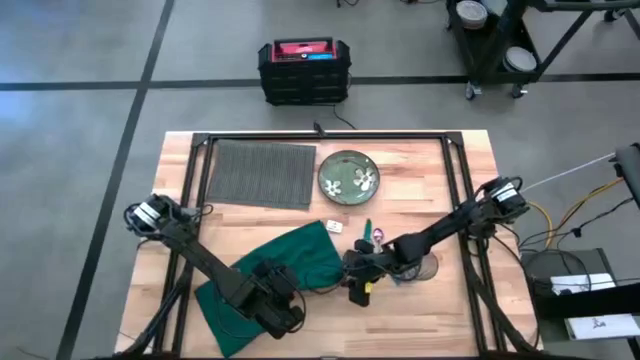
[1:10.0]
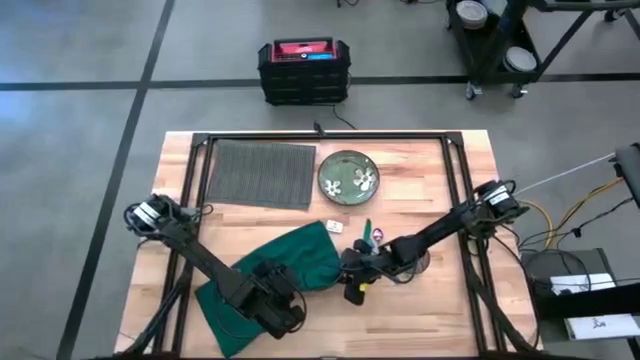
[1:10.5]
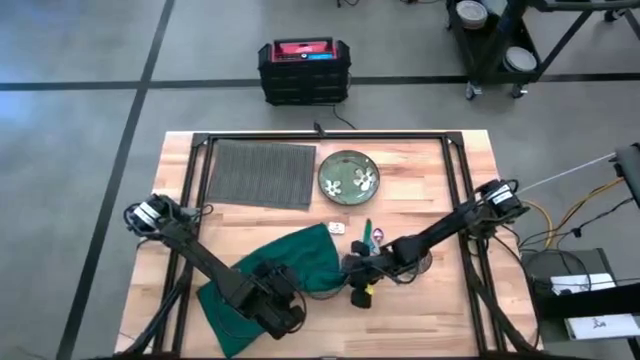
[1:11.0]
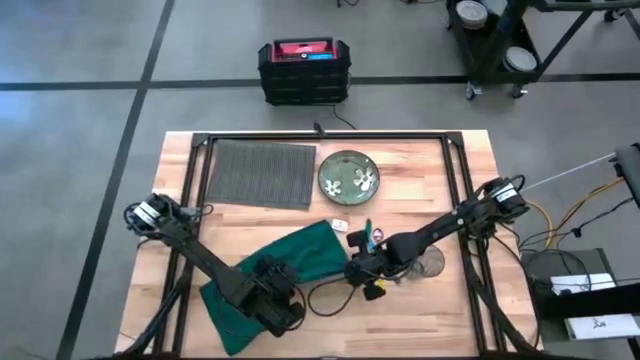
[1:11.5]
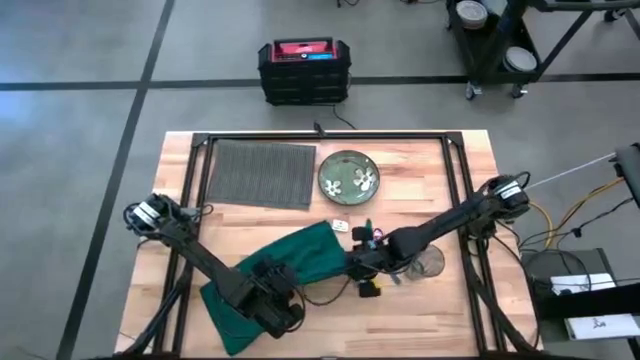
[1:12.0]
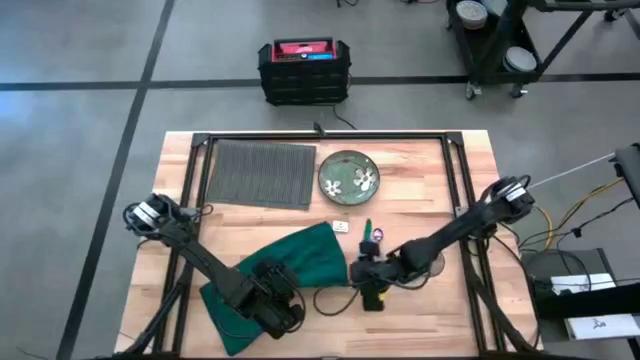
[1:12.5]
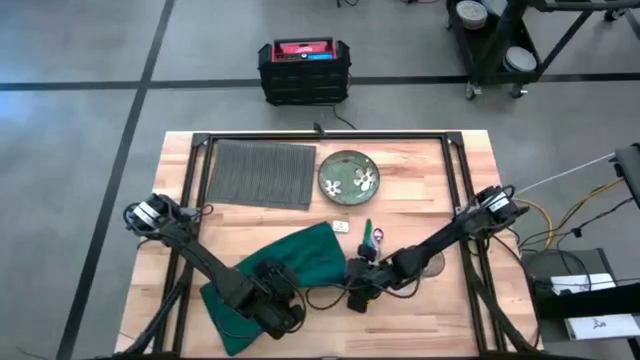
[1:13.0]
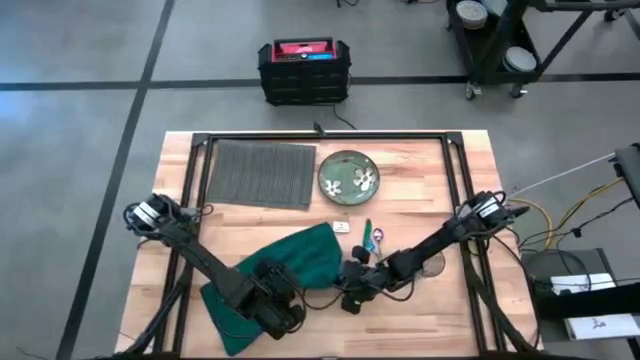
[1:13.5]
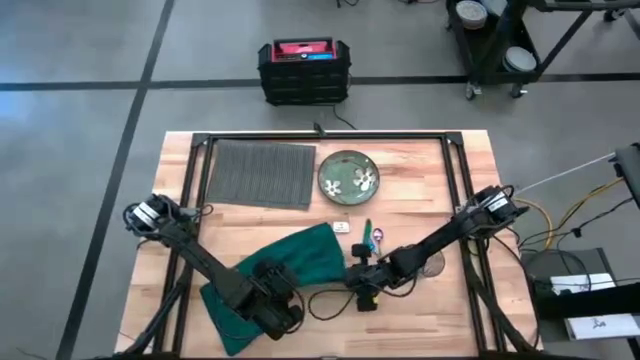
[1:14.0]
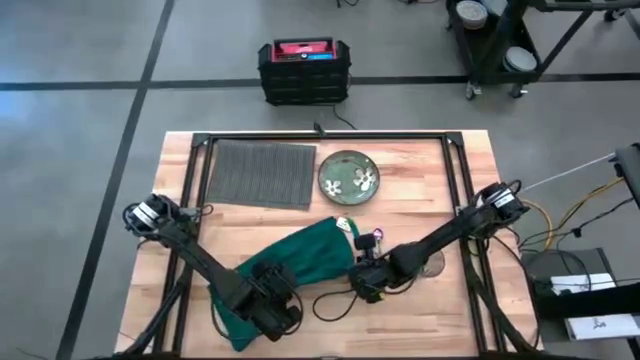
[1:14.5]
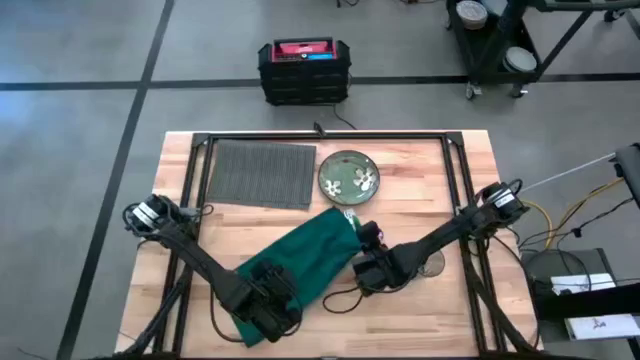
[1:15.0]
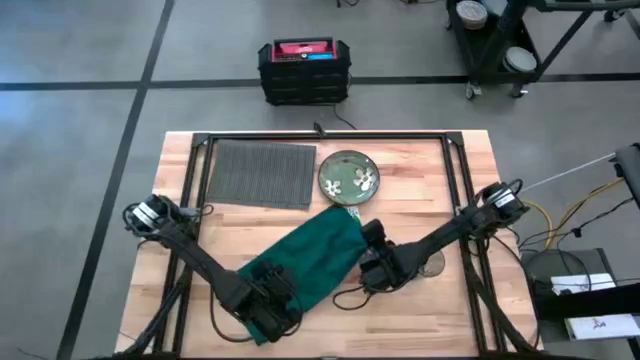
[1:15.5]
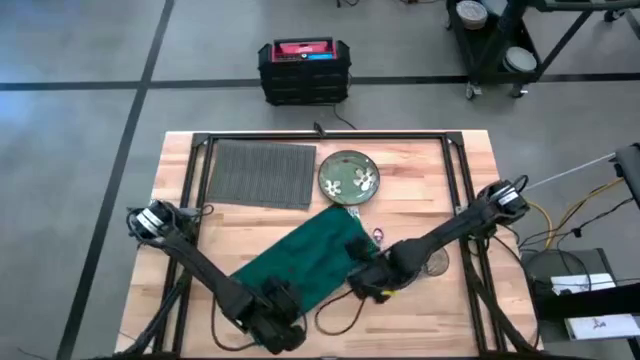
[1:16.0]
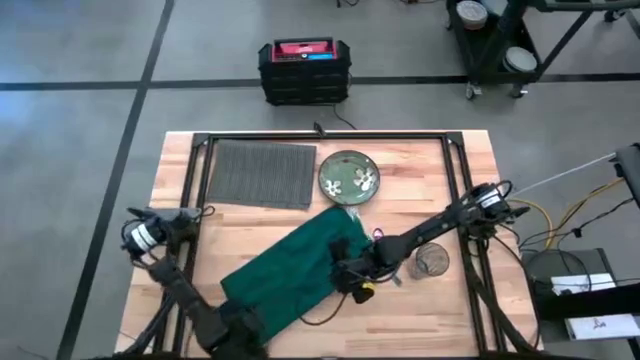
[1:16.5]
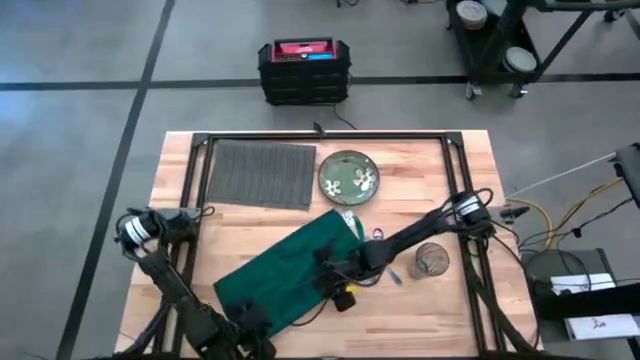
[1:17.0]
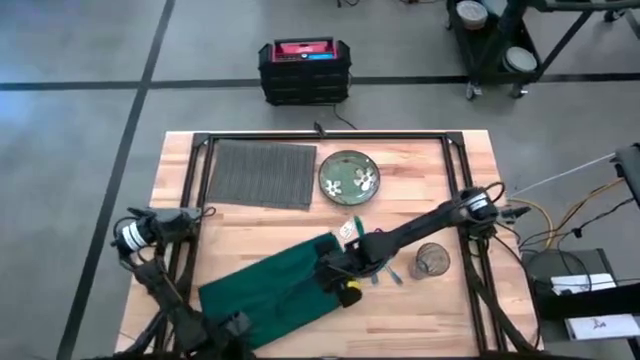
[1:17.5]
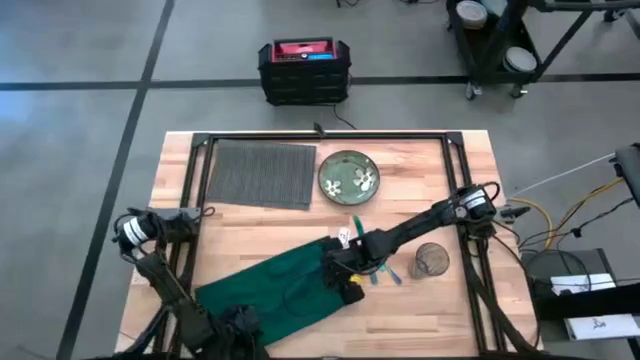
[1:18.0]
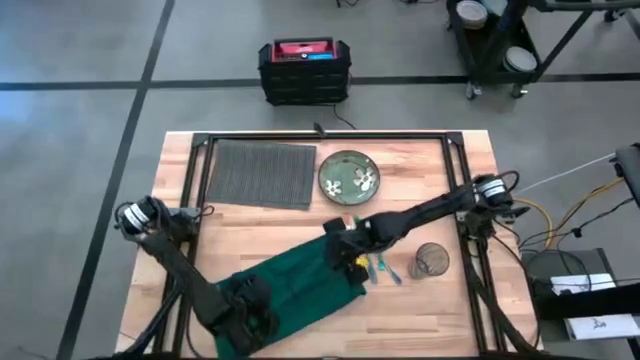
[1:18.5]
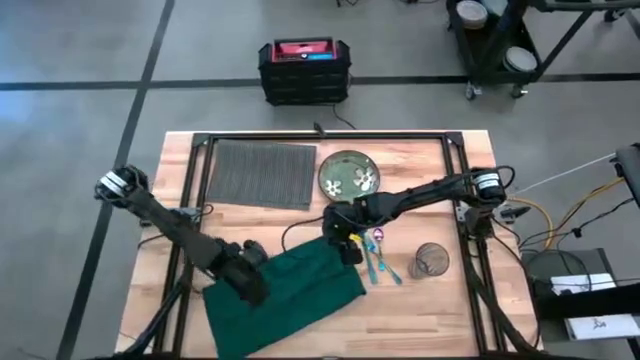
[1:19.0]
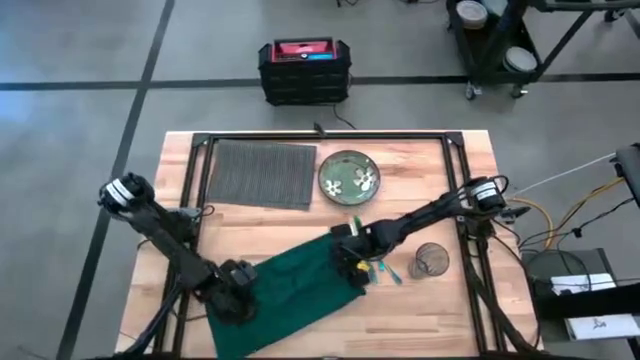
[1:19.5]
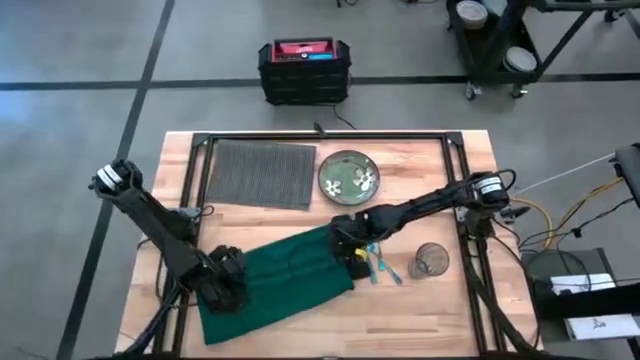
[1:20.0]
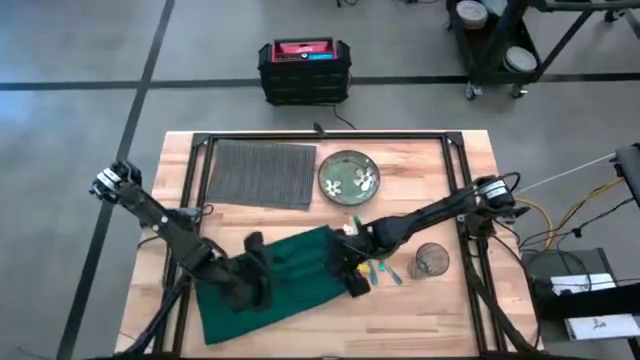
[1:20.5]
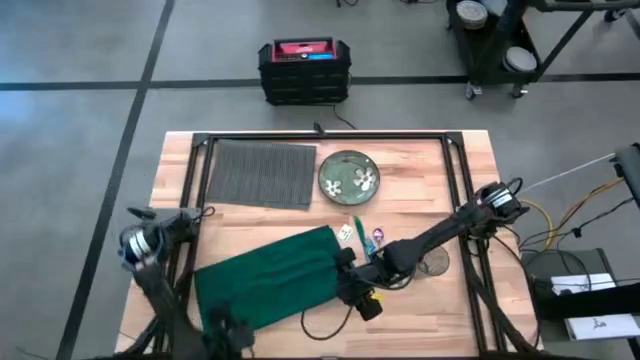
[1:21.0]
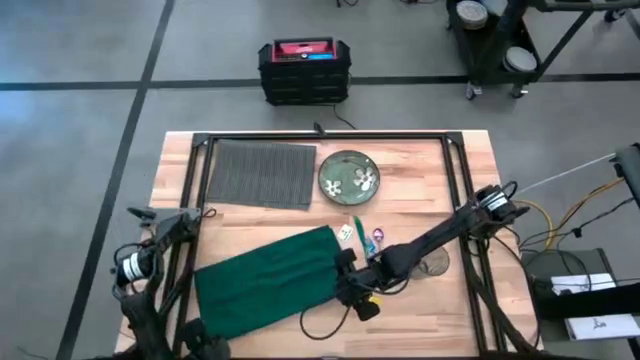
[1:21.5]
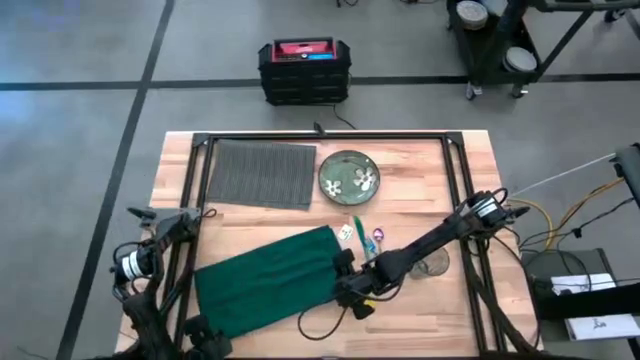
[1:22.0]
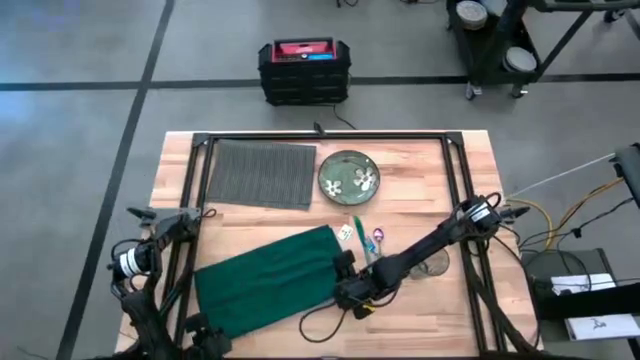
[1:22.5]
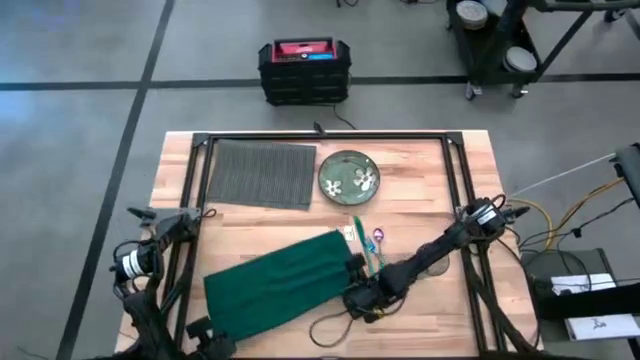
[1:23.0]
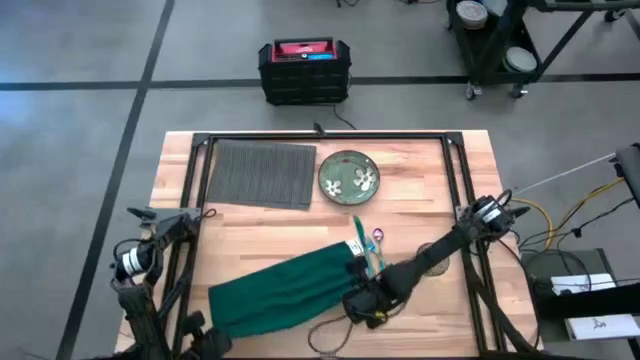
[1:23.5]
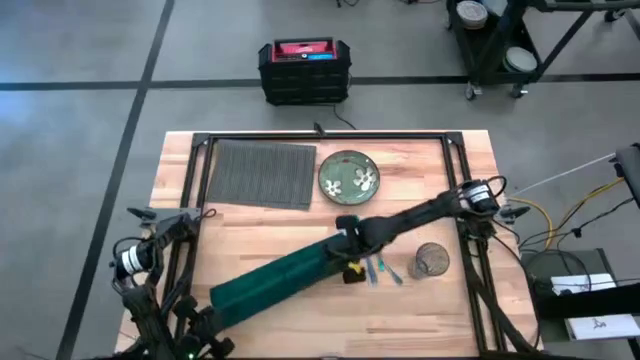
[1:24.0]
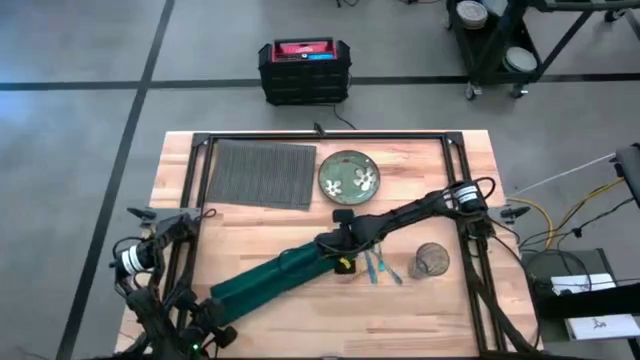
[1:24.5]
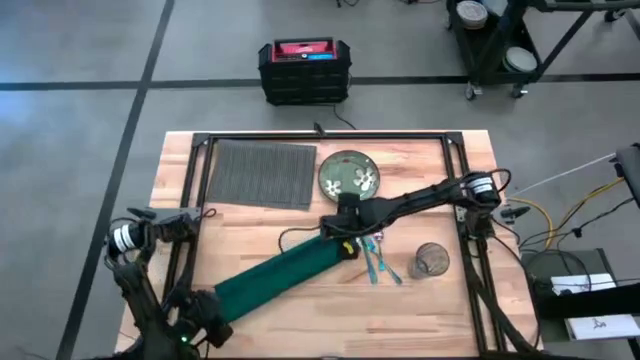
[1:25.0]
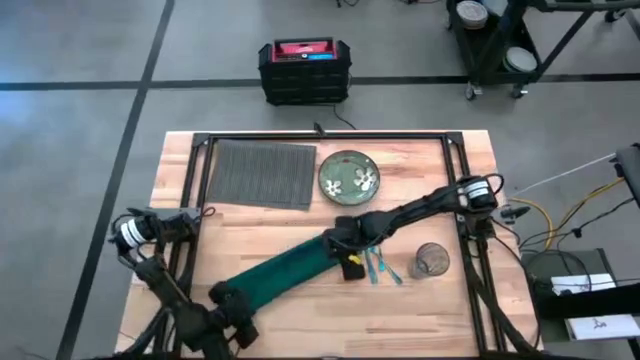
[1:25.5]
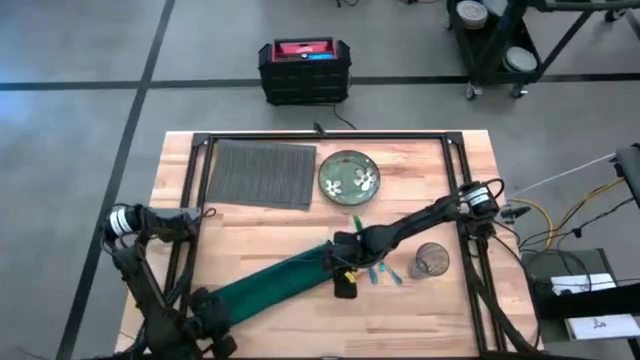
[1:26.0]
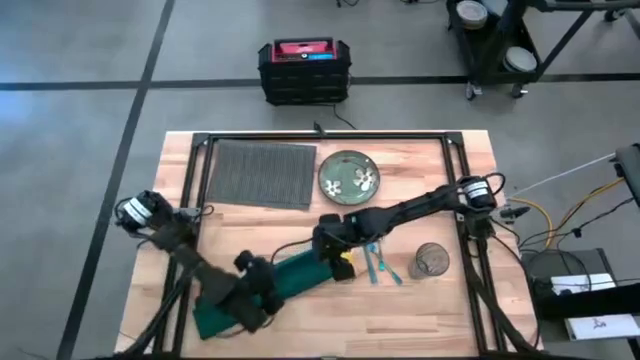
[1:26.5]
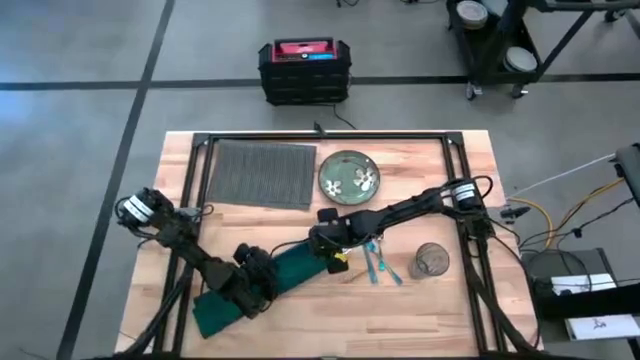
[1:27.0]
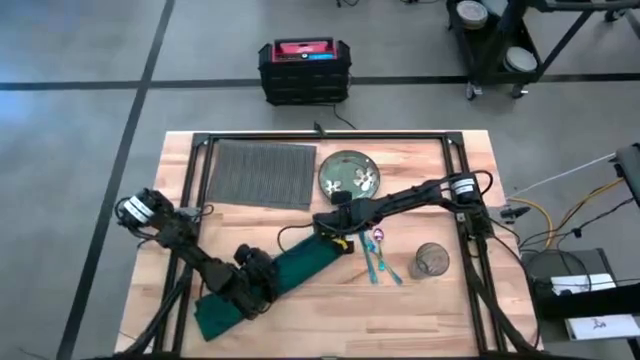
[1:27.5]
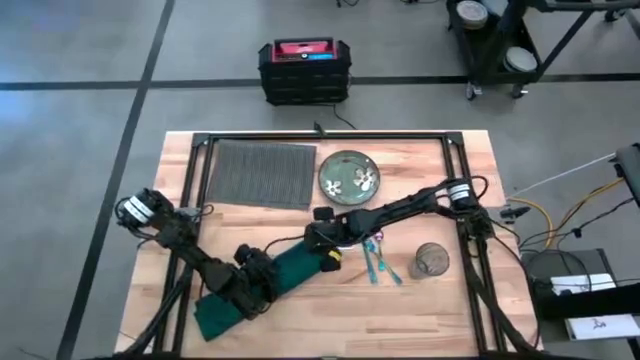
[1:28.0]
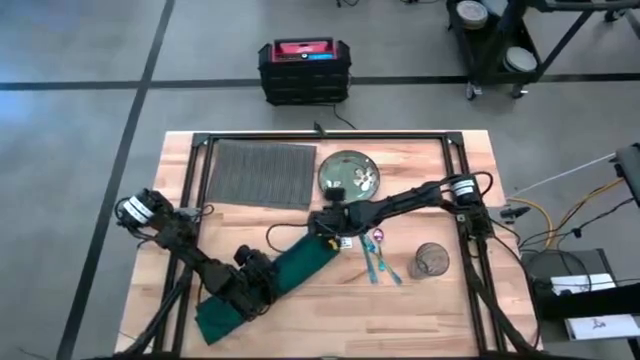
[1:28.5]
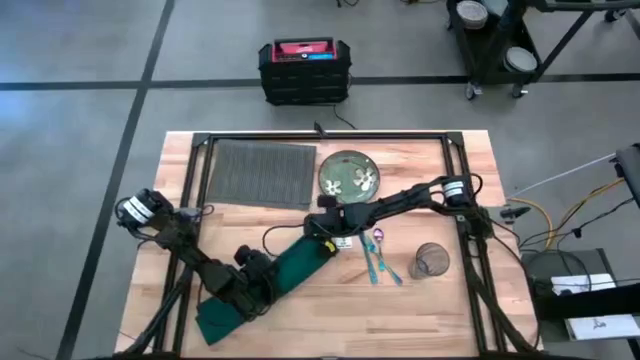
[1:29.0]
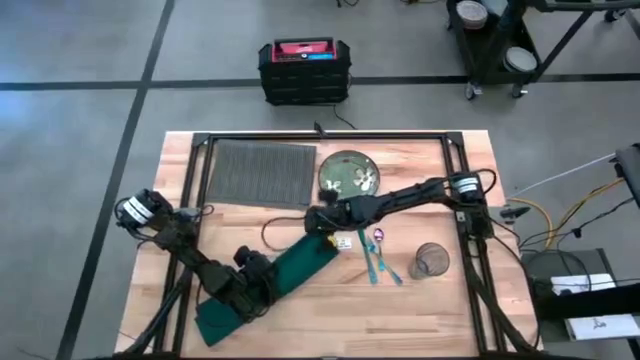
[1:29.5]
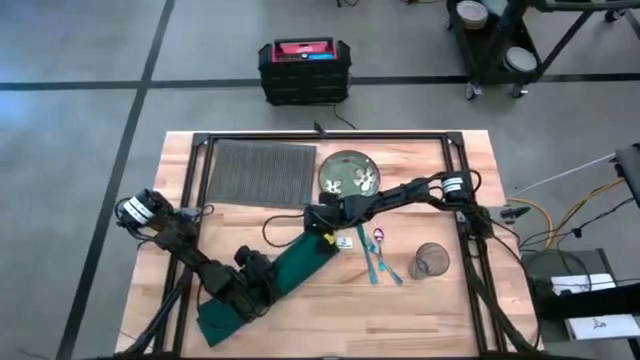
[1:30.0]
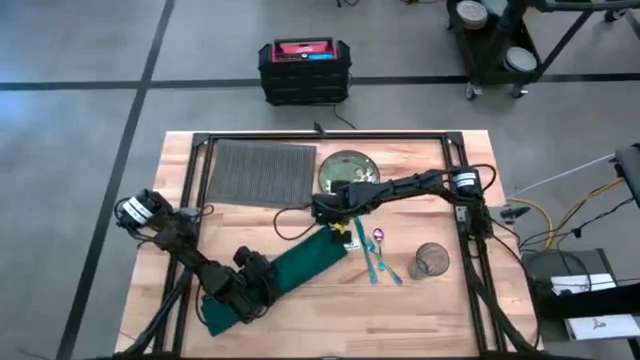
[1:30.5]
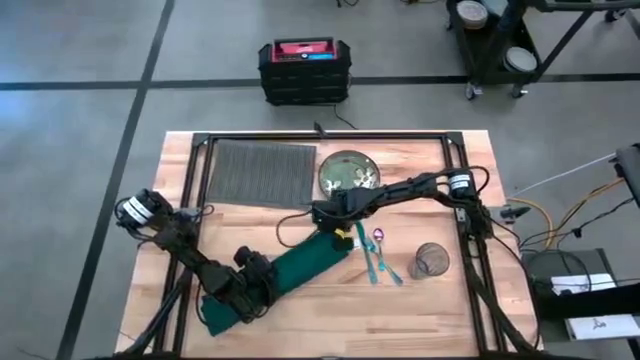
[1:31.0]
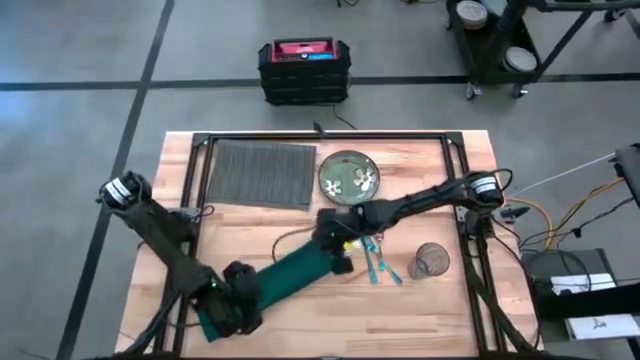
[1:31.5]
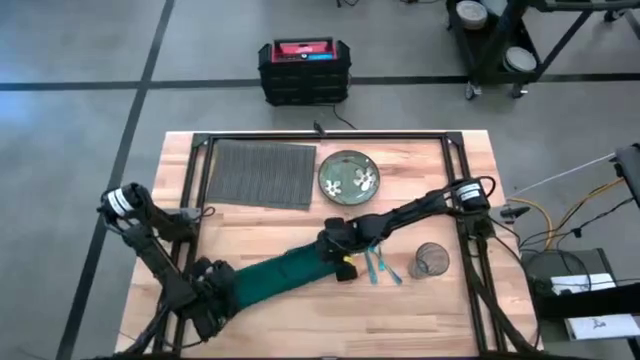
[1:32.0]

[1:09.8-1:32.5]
Task: Set table place
Fold the green napkin
